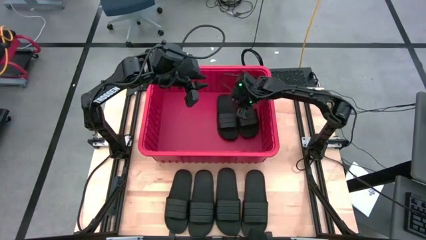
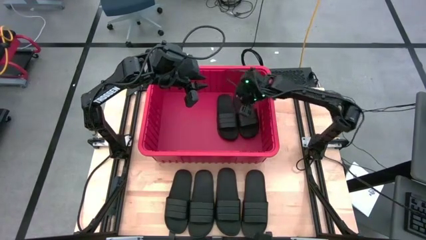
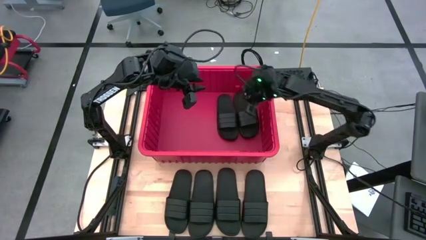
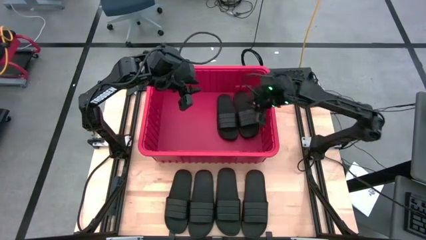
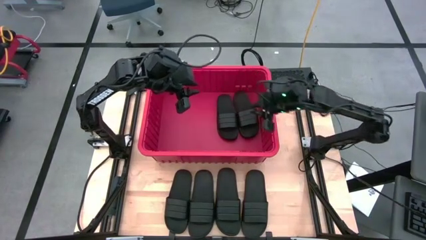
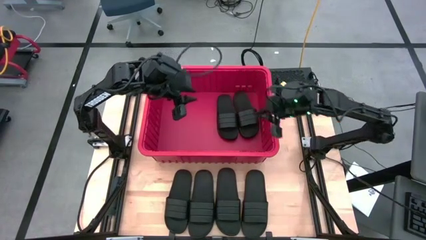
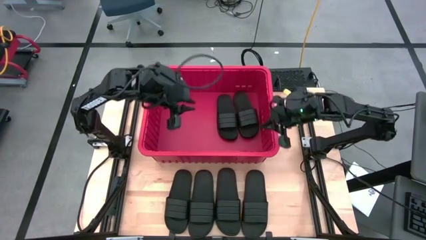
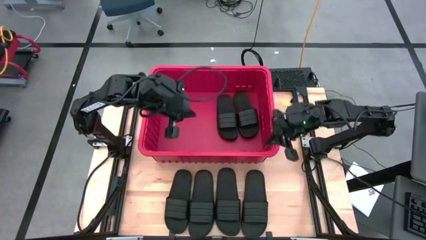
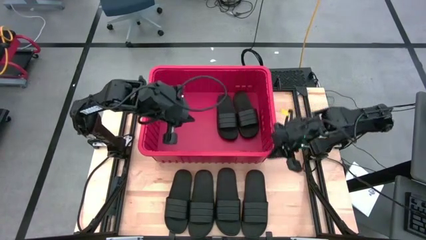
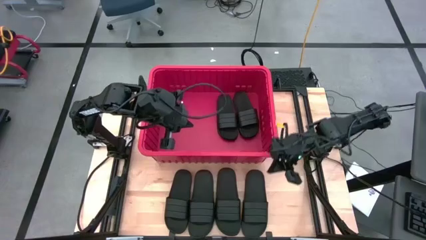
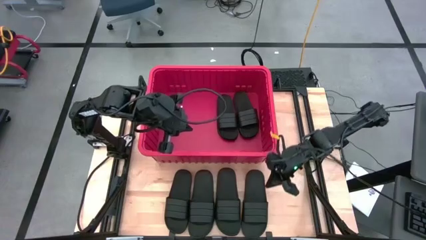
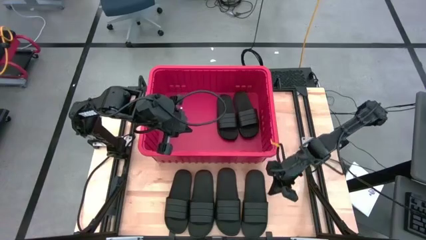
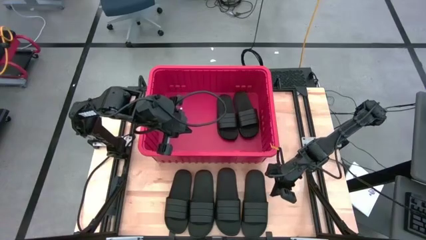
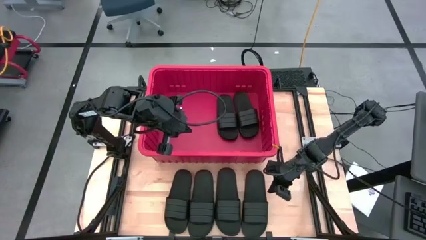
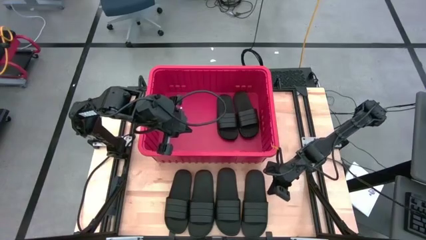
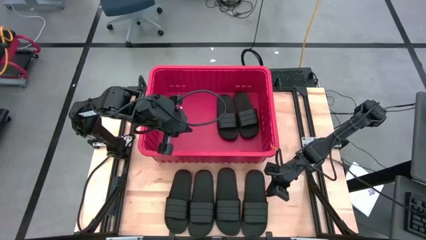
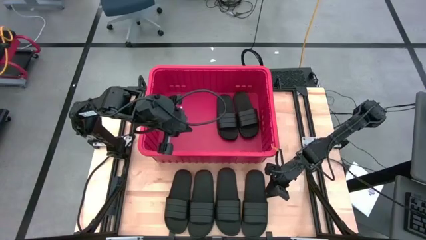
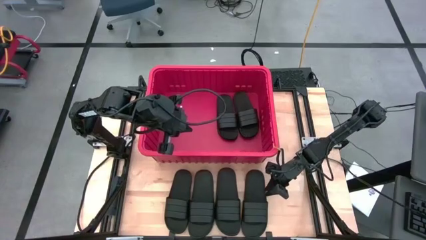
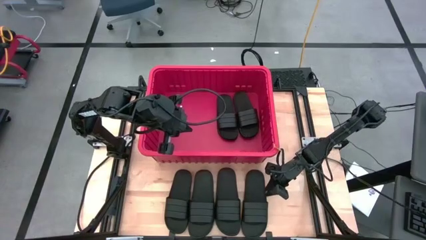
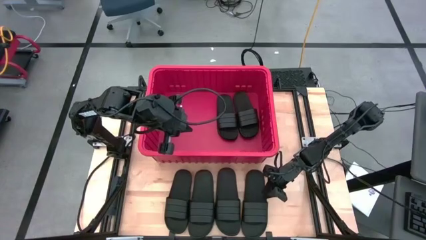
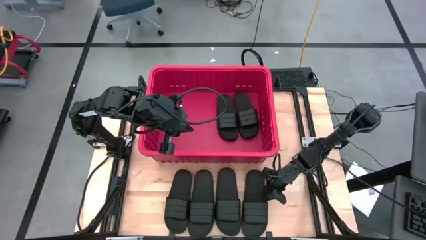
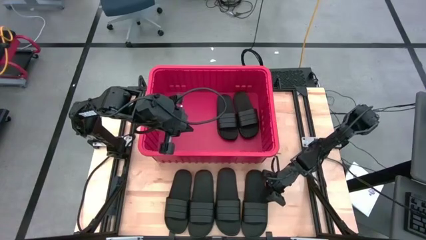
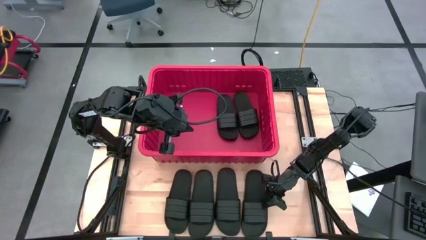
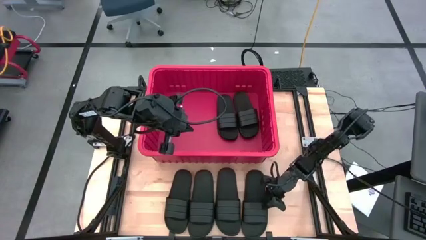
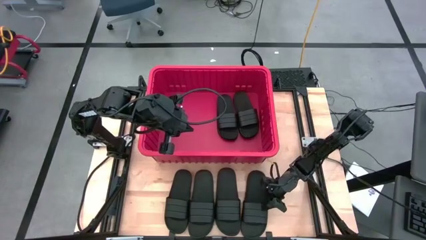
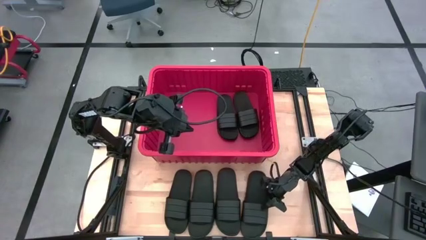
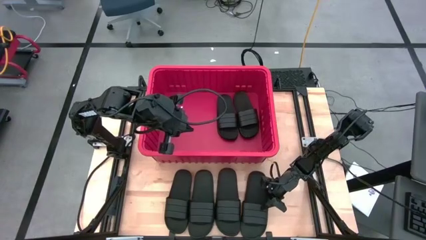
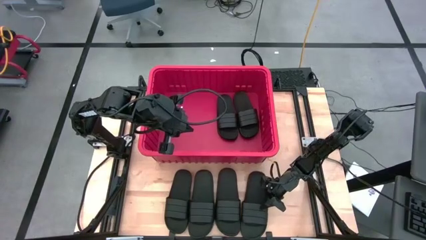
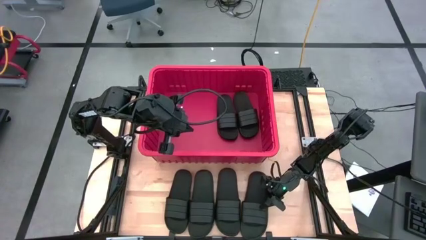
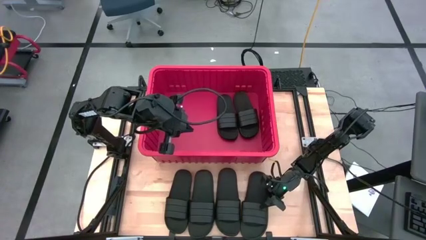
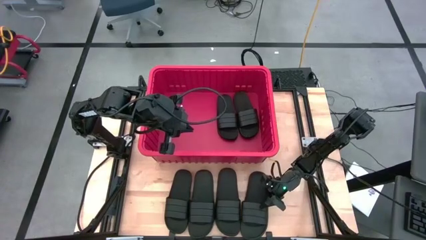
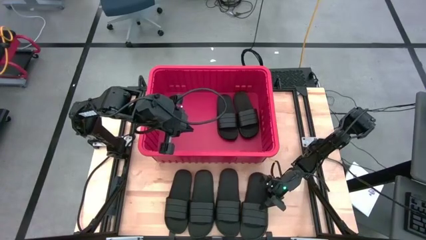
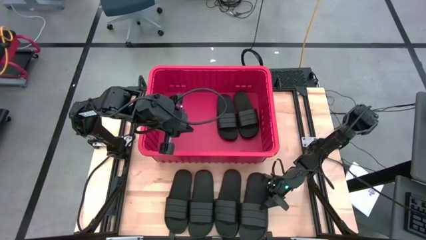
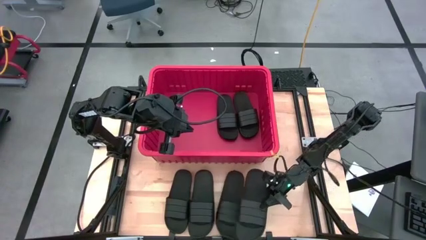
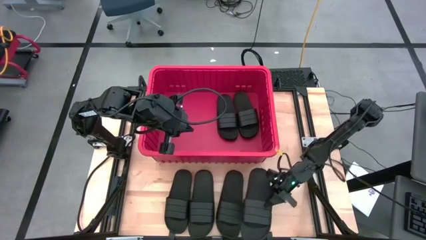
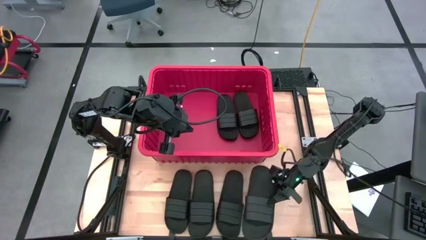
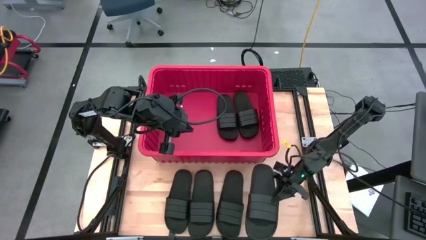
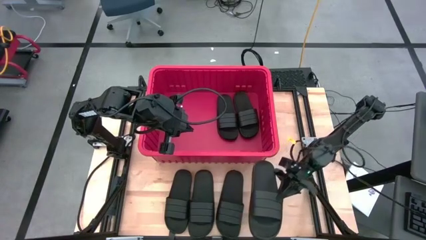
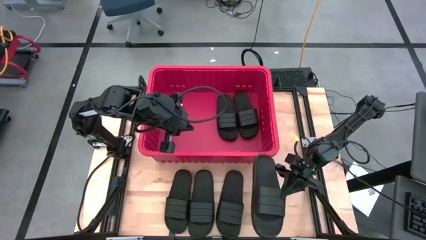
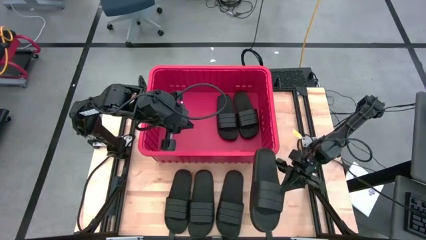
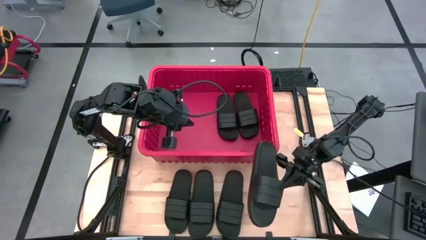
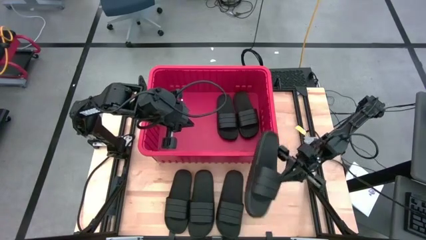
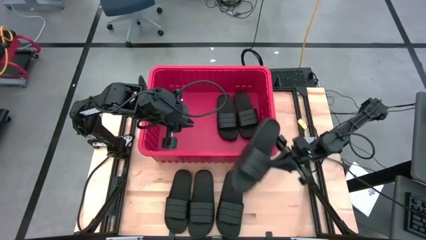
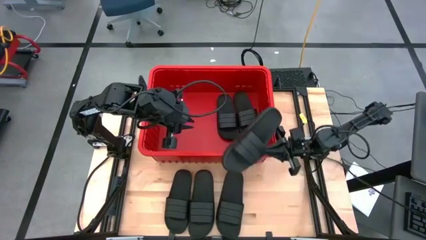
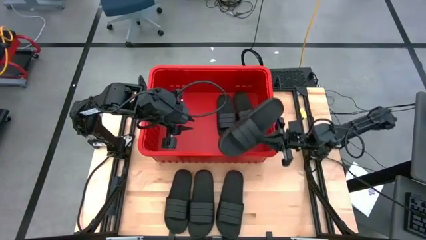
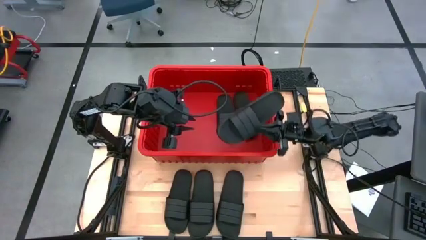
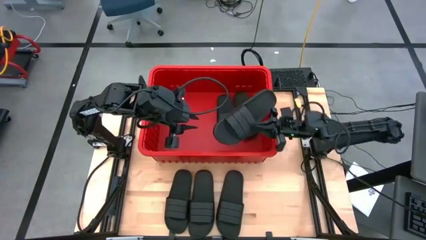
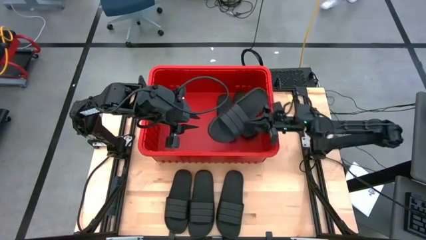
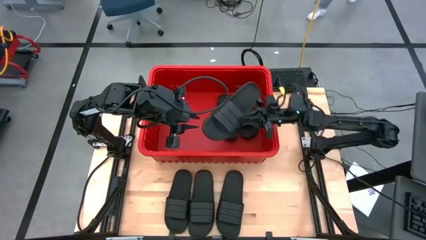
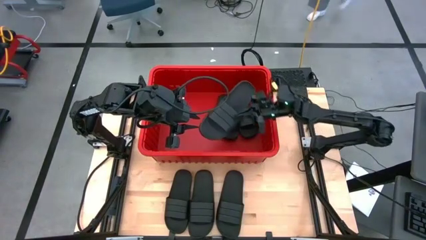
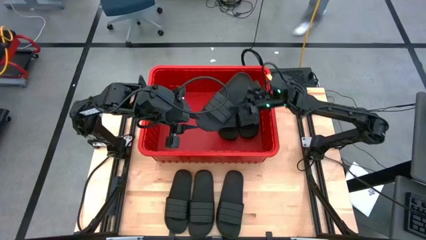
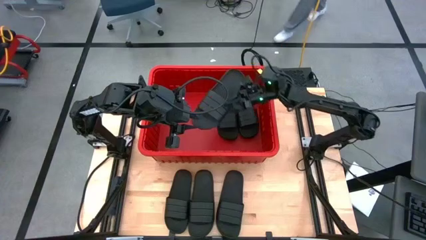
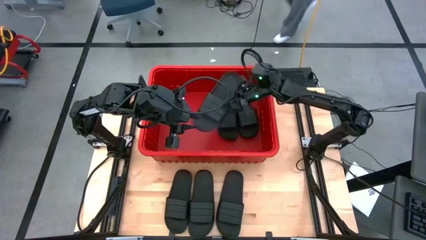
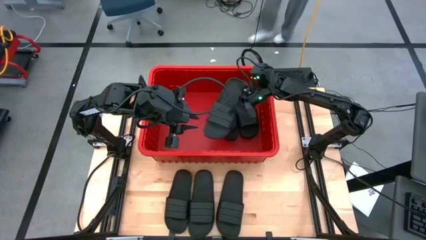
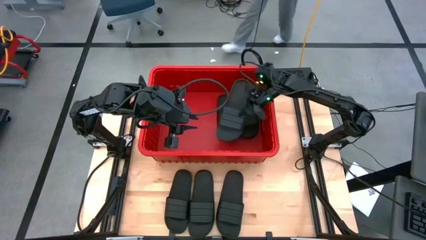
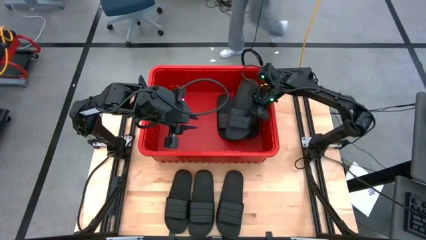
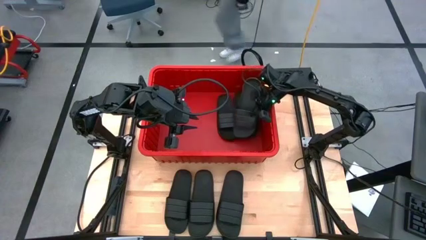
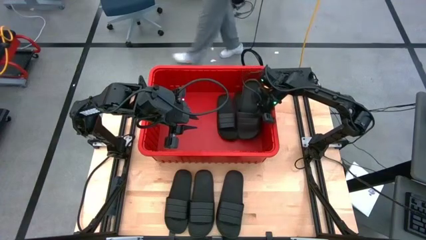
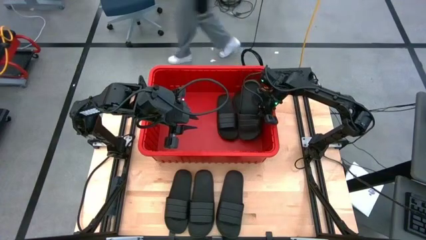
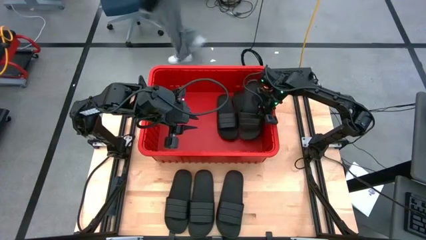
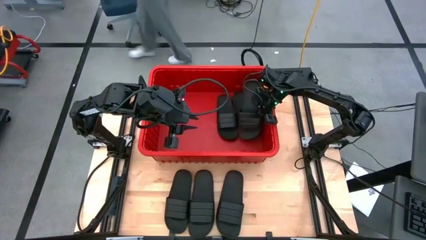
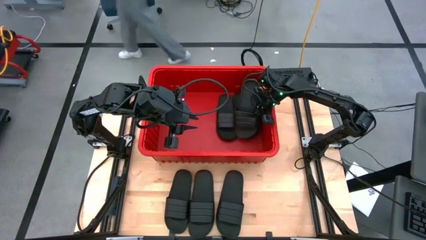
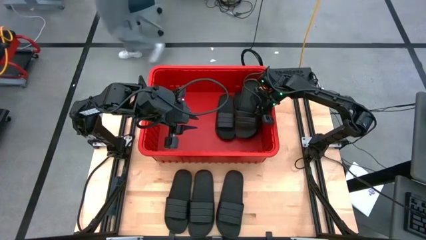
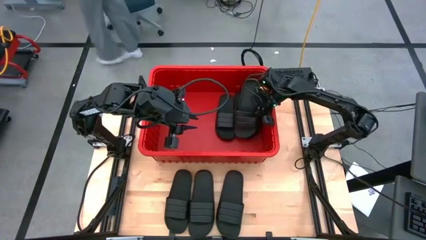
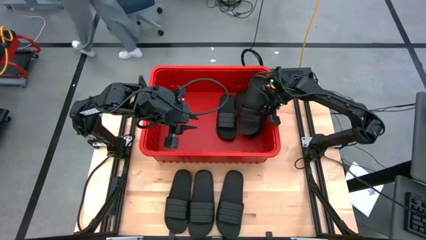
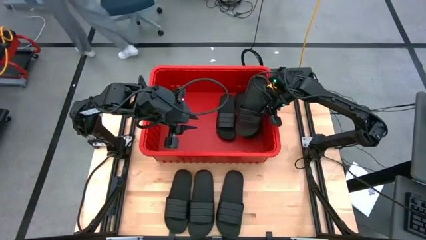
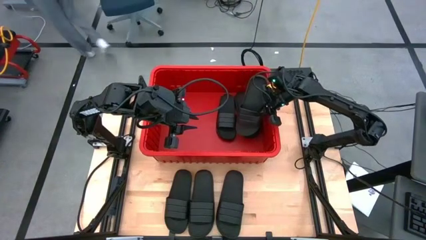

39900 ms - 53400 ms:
Task: Pick and place slides into bin
Put the black slide into the red bin
